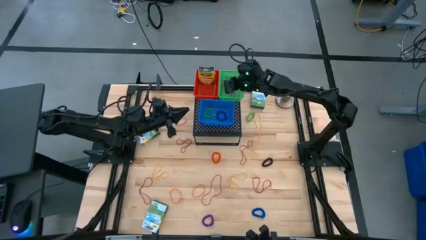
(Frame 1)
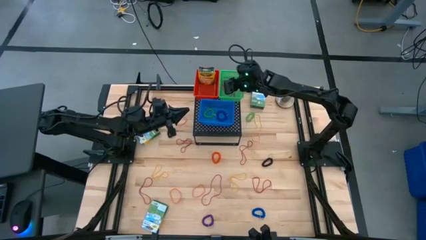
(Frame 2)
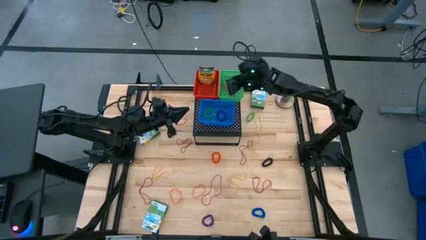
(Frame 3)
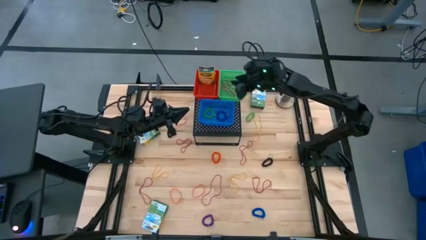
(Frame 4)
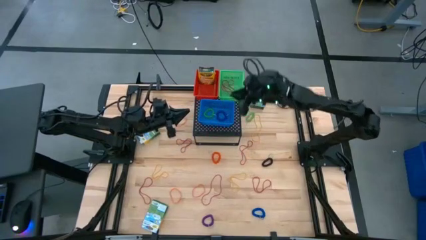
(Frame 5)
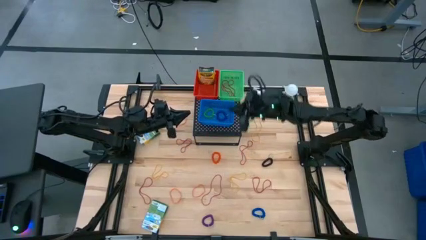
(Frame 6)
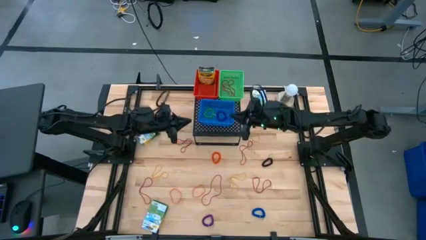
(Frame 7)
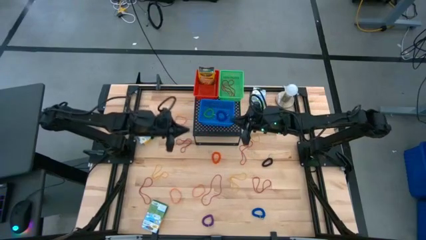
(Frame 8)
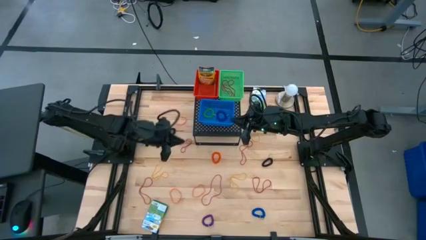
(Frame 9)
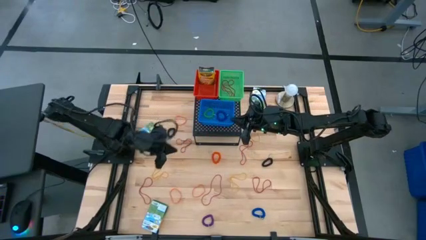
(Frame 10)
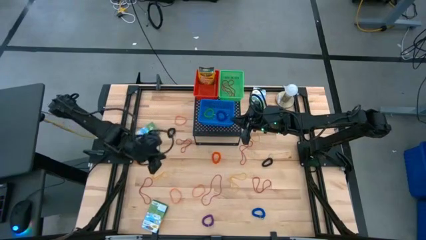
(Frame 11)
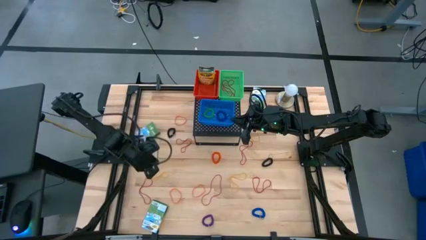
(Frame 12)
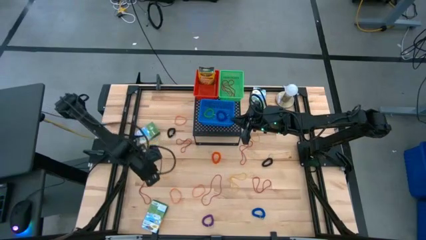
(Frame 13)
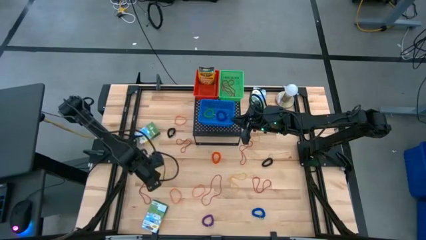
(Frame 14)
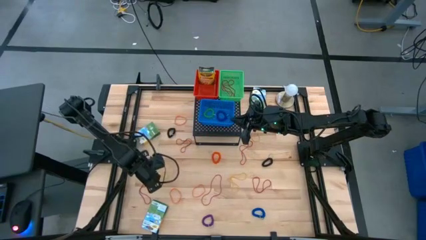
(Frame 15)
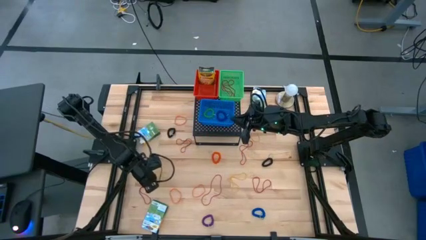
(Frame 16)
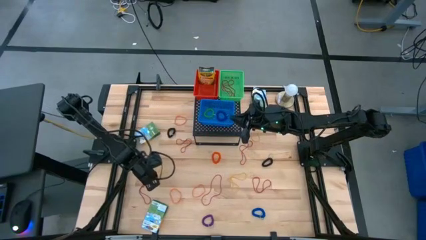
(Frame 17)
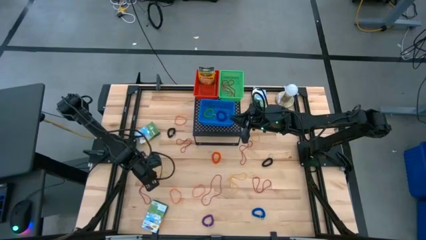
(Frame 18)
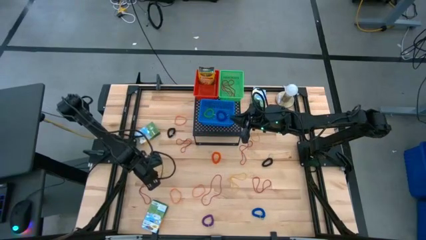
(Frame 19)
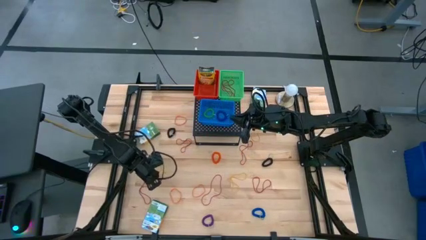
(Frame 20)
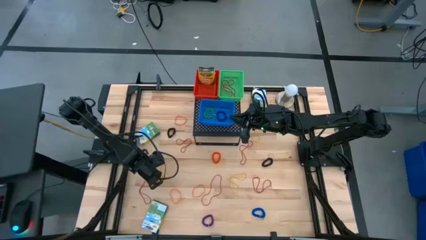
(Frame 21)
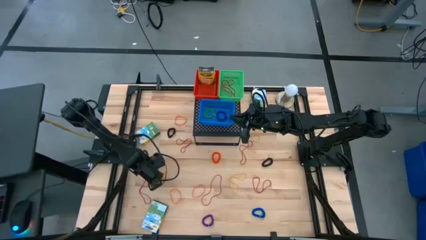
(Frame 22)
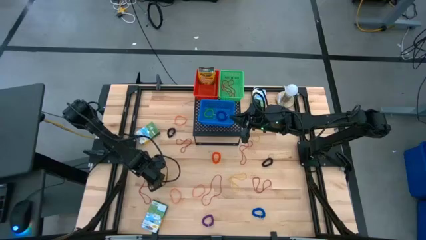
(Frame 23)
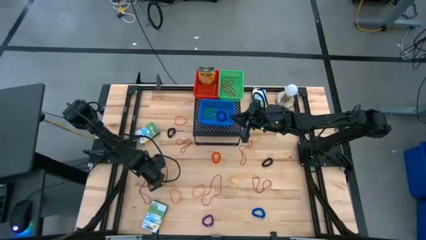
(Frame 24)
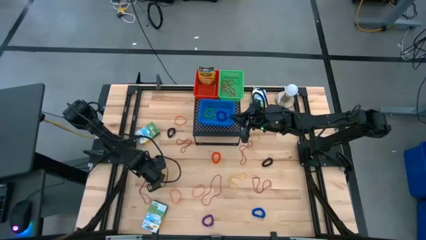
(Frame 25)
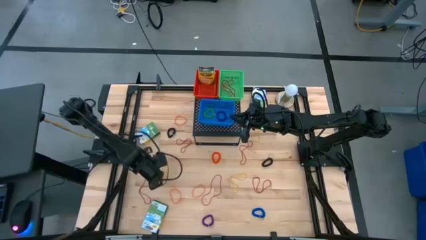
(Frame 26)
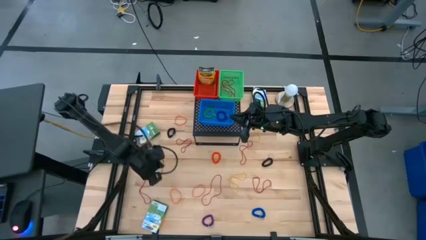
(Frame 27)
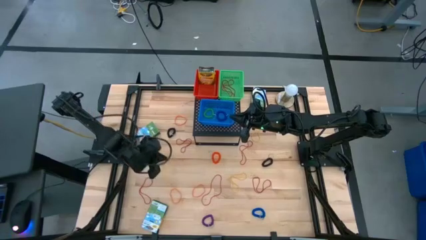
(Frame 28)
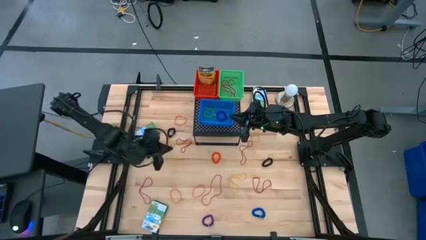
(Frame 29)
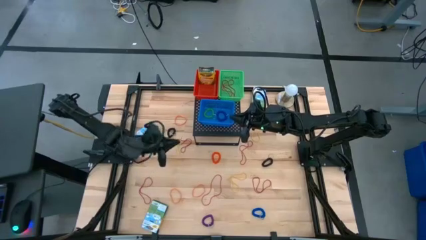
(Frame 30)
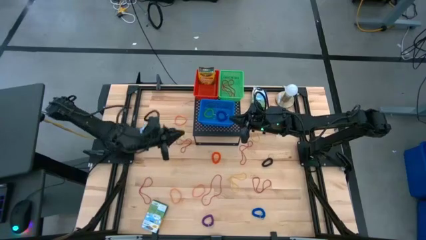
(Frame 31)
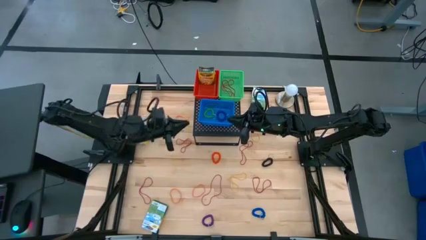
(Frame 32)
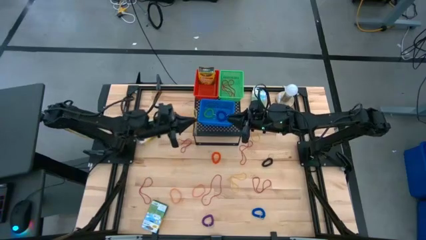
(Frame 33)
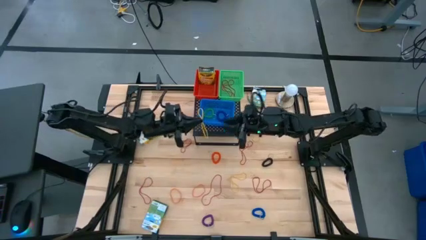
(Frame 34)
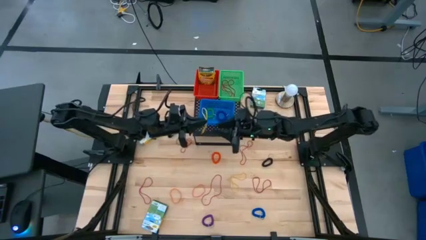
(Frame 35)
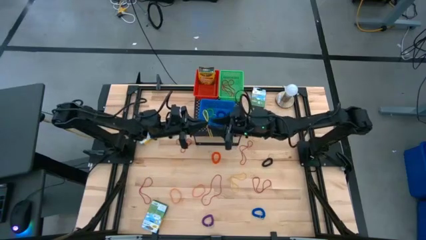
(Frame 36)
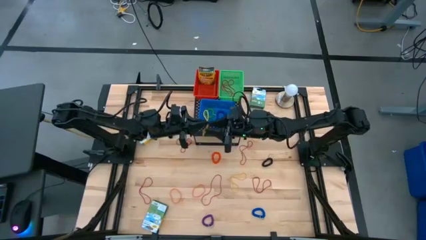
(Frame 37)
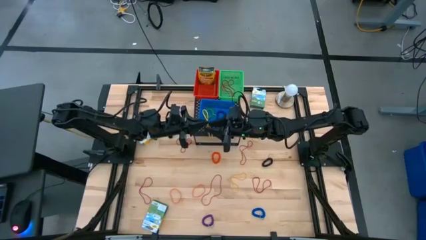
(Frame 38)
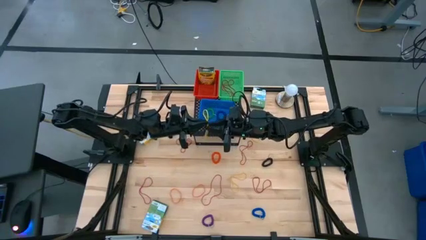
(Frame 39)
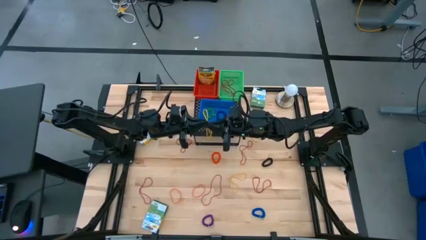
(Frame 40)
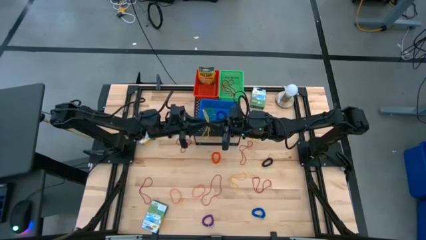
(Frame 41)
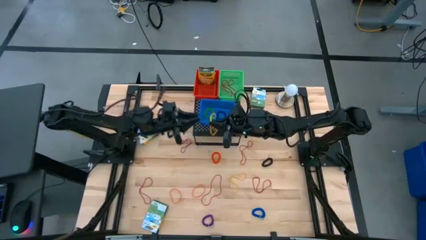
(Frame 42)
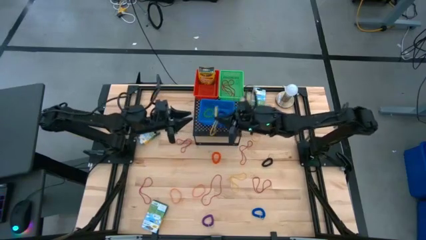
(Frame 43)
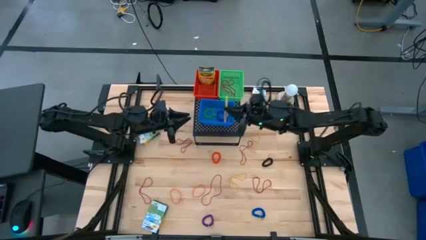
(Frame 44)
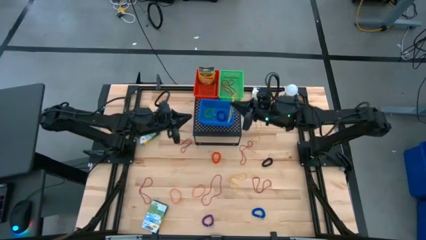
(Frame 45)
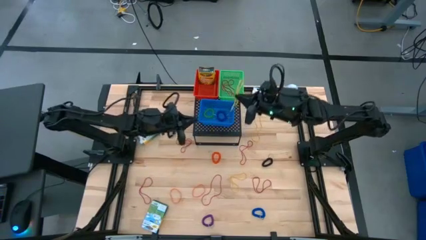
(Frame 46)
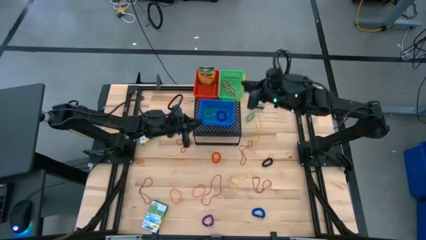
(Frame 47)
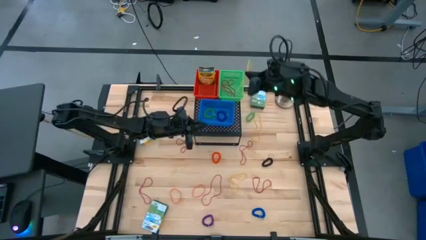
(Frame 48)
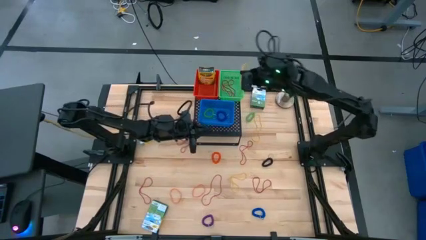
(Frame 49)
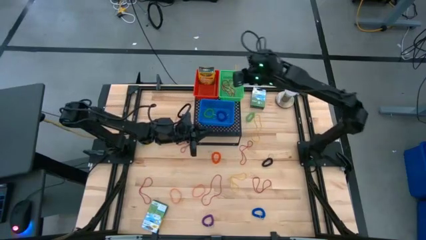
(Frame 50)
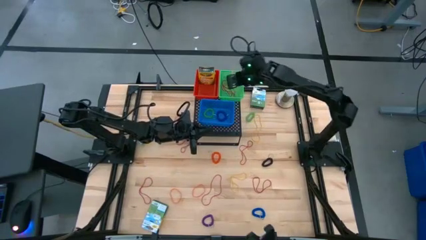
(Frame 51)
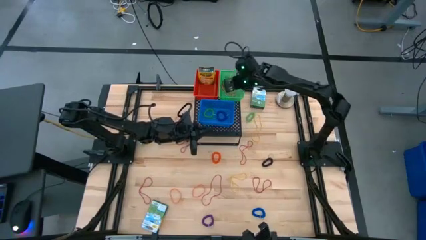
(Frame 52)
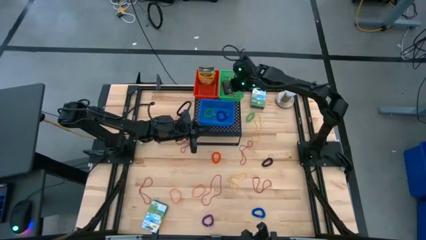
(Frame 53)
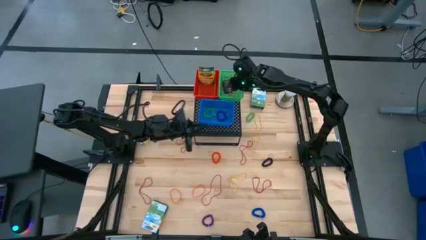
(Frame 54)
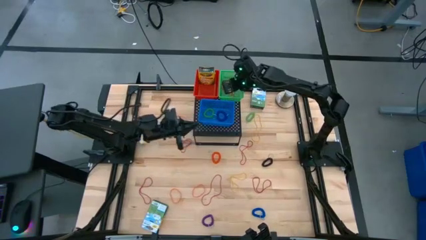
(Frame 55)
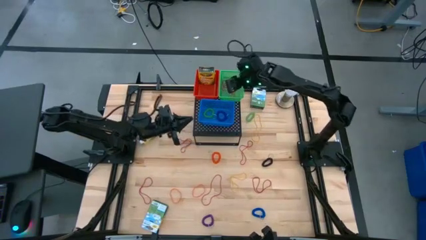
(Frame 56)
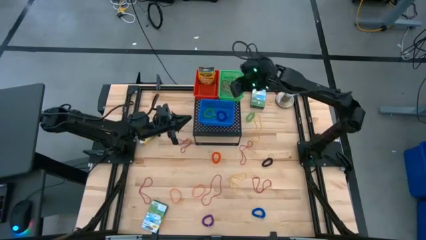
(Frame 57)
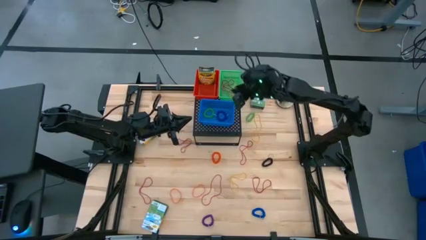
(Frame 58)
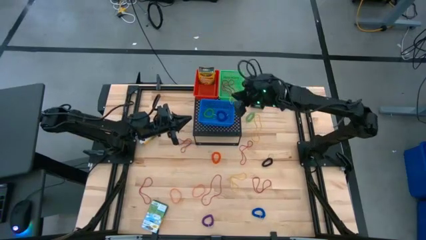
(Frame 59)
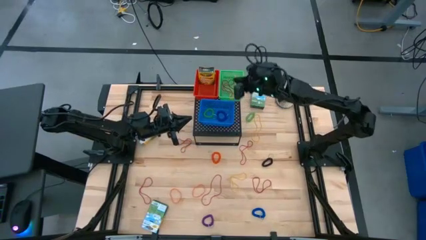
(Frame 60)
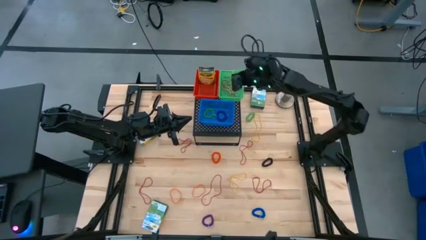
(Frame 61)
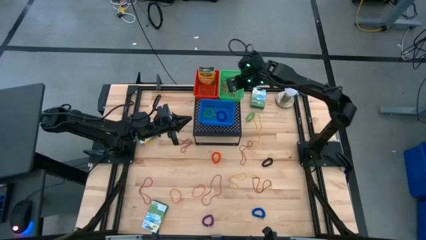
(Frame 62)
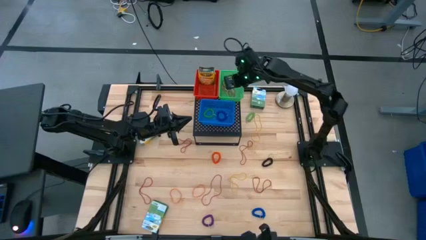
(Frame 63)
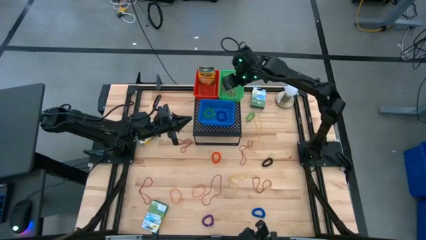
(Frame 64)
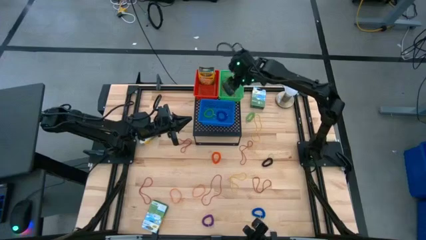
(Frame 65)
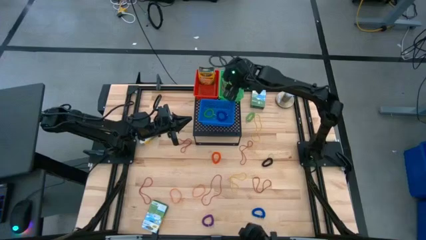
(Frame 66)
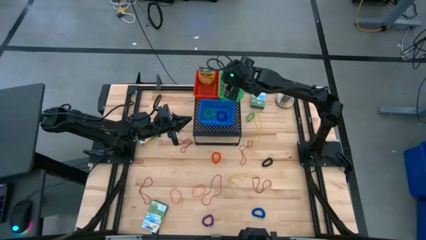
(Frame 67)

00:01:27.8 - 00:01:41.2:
Task: Pick & Place Office Desk Supplies
Put the yellow rubber band into the green bin on the shelf

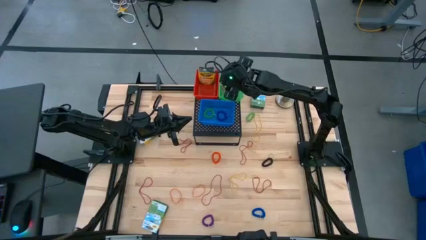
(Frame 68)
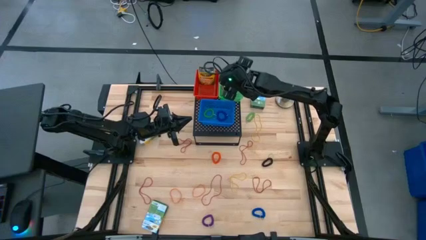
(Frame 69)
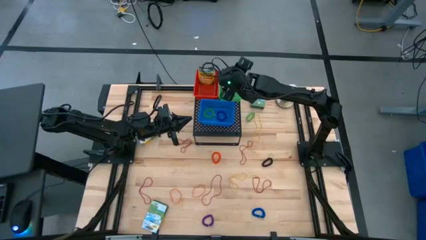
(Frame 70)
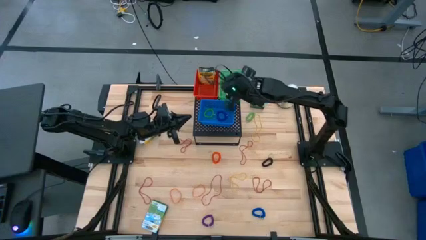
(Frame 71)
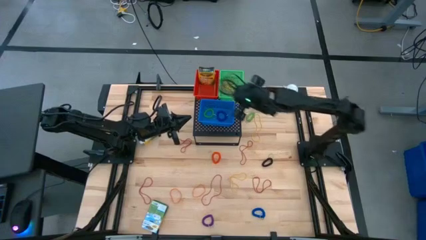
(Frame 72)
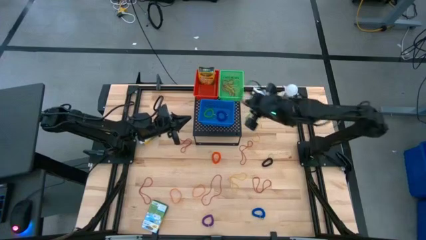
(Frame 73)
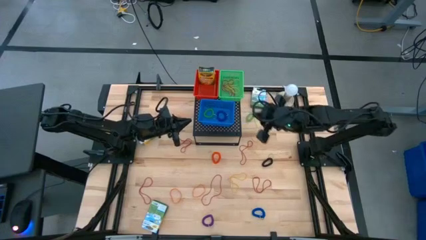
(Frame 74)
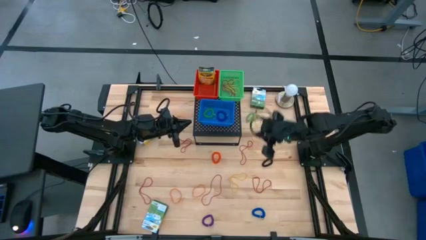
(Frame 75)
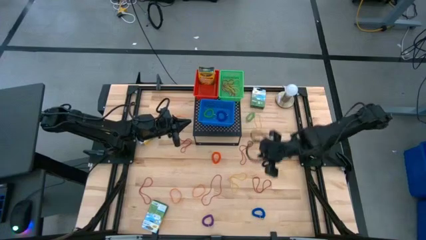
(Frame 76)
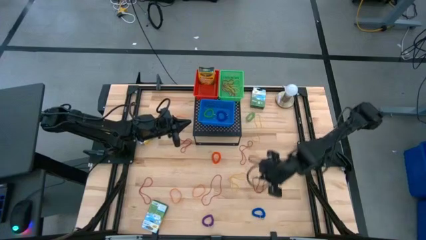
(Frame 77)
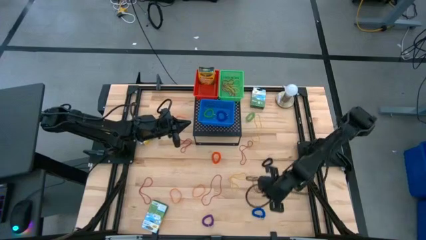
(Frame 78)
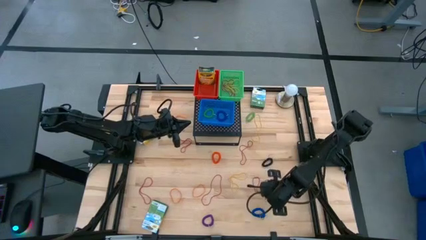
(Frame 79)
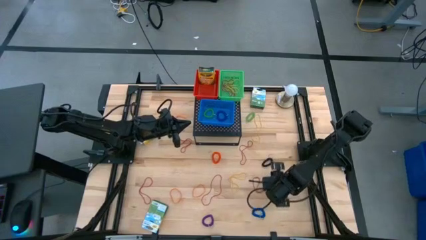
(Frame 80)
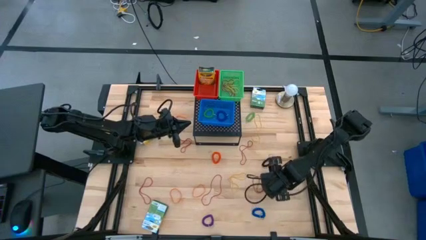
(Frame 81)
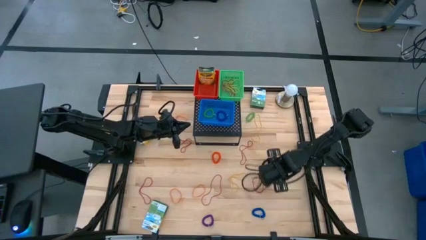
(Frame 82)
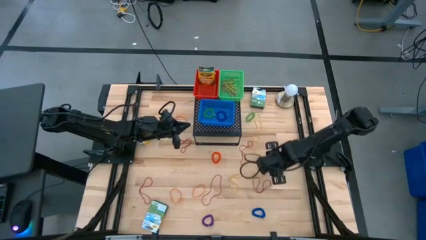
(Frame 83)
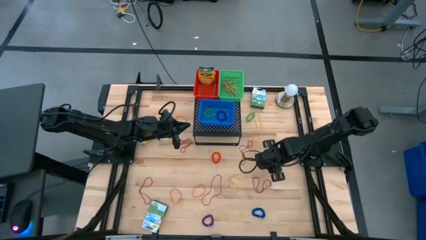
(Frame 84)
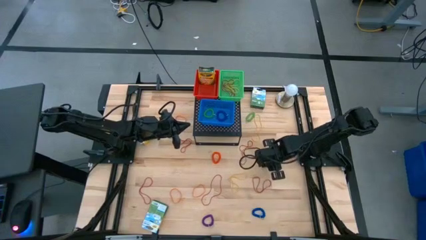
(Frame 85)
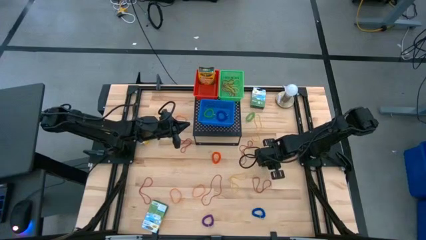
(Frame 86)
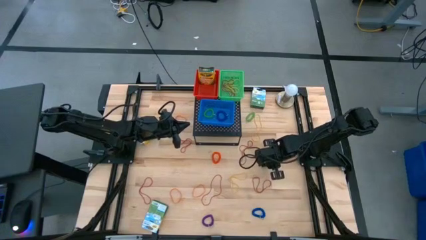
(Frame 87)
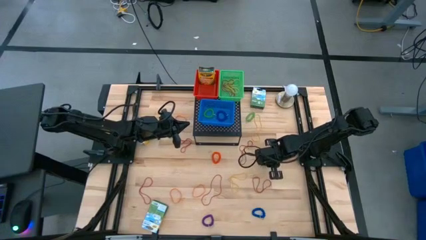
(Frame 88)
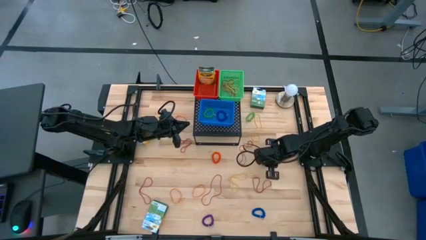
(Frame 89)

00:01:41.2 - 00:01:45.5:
Put the black spring keychain into the blue bin on the shelf
